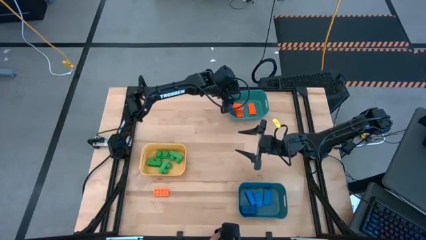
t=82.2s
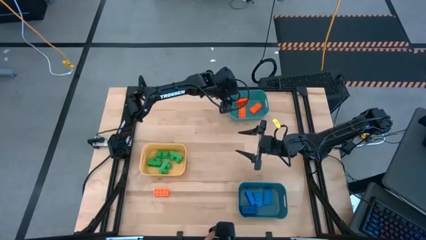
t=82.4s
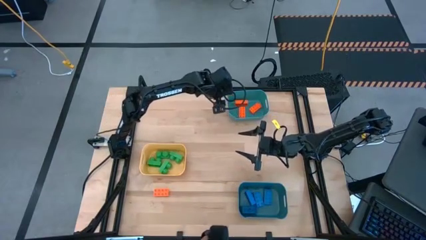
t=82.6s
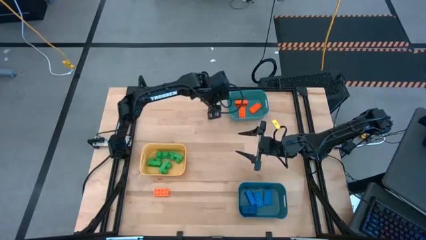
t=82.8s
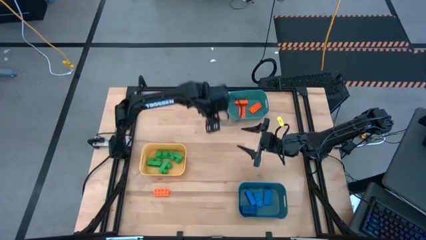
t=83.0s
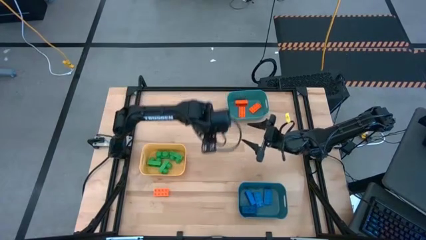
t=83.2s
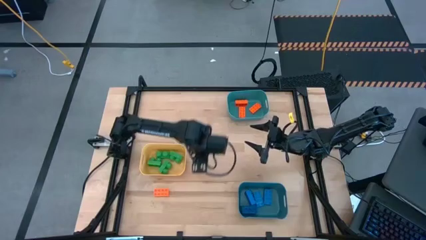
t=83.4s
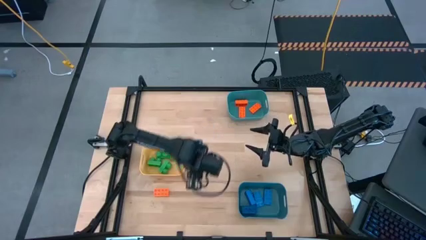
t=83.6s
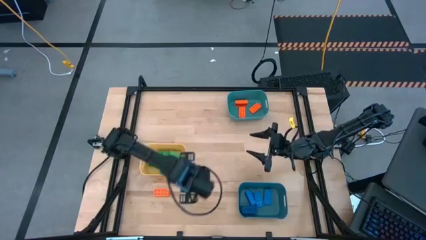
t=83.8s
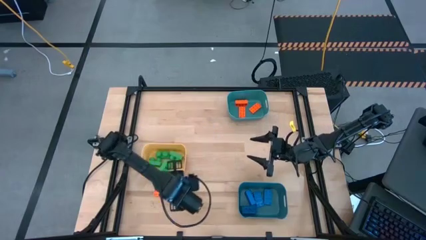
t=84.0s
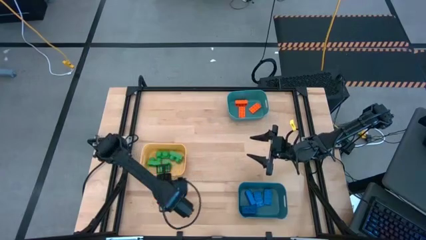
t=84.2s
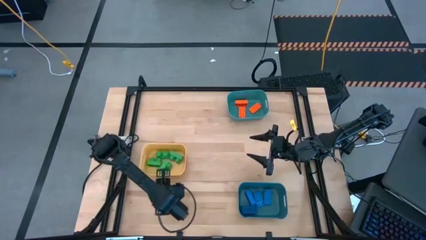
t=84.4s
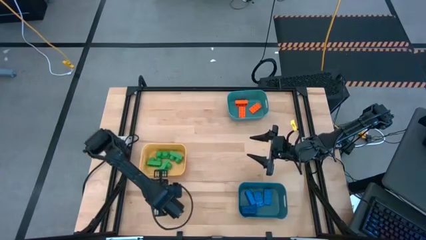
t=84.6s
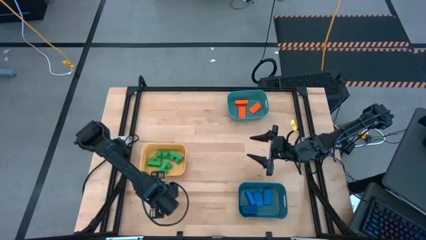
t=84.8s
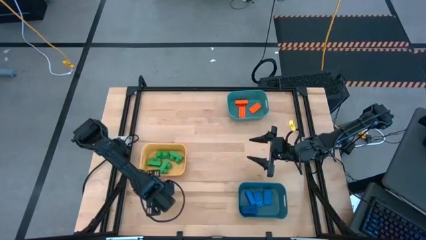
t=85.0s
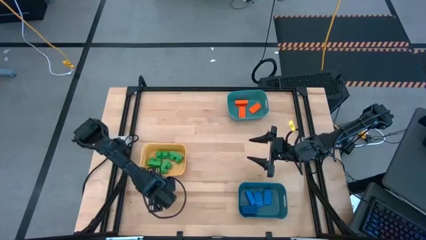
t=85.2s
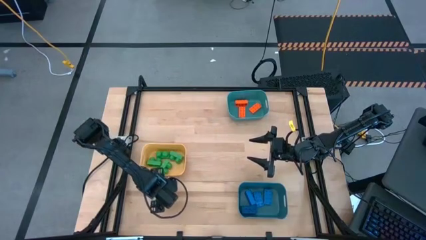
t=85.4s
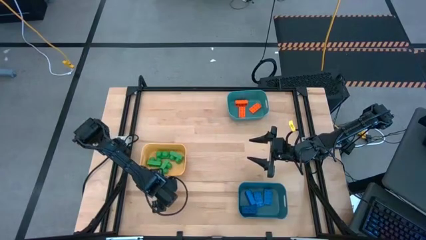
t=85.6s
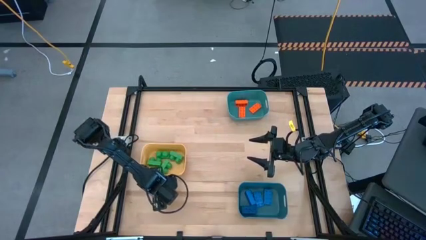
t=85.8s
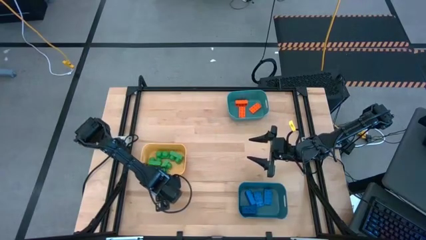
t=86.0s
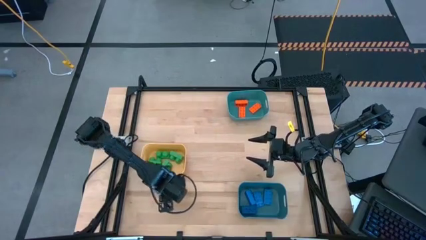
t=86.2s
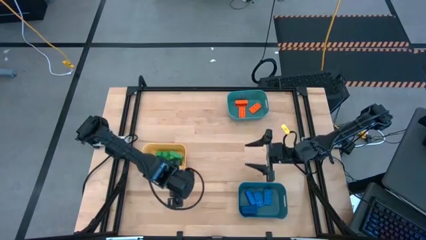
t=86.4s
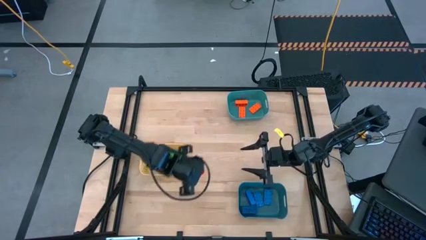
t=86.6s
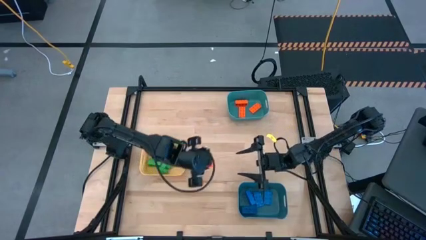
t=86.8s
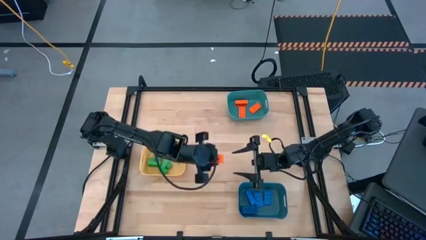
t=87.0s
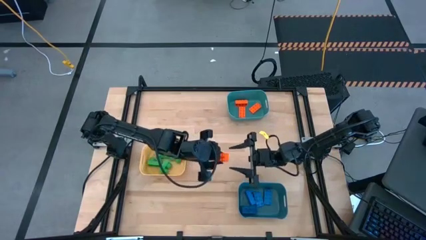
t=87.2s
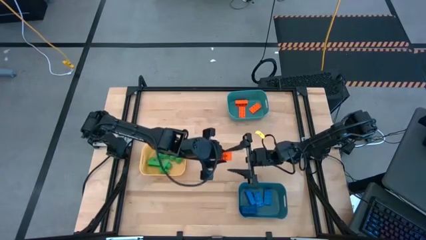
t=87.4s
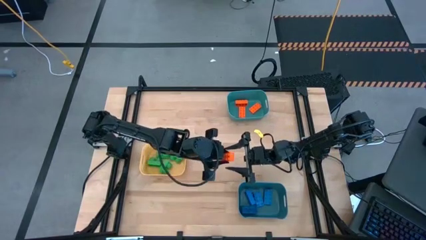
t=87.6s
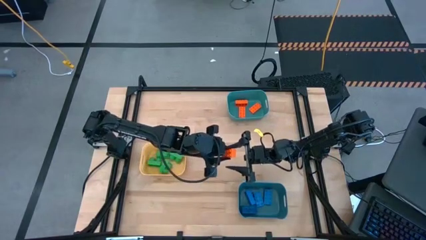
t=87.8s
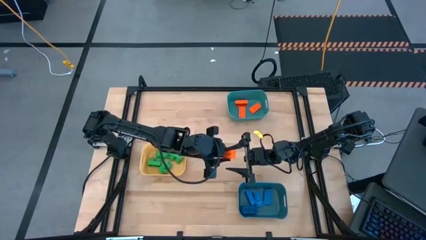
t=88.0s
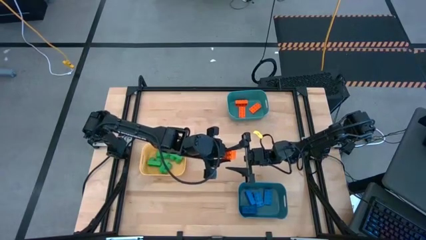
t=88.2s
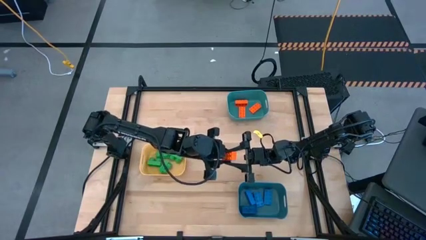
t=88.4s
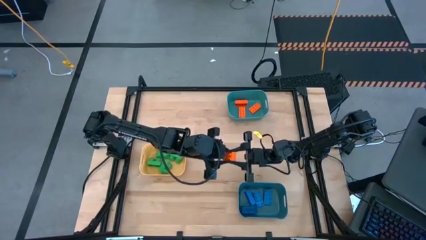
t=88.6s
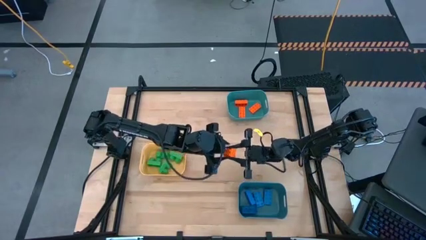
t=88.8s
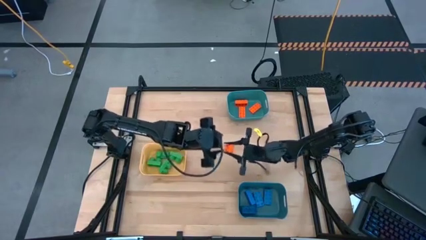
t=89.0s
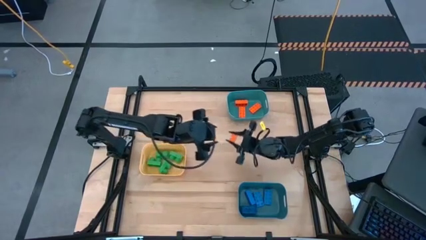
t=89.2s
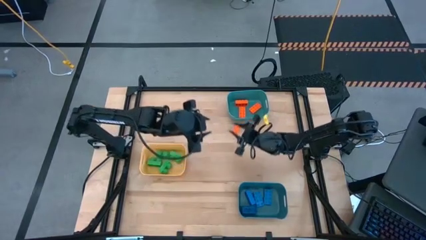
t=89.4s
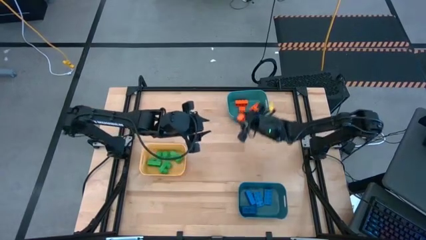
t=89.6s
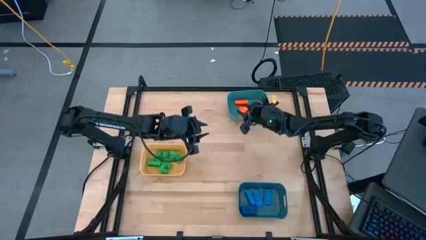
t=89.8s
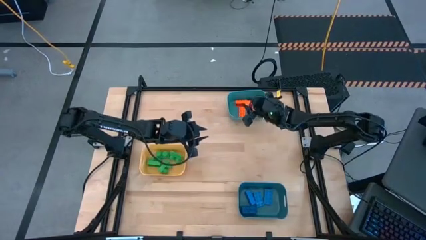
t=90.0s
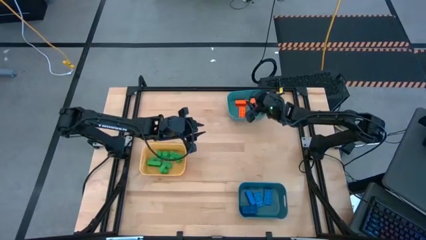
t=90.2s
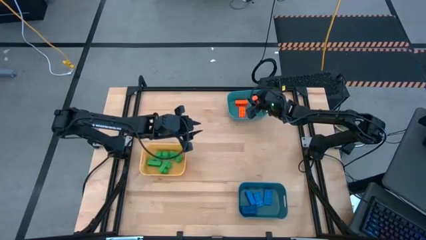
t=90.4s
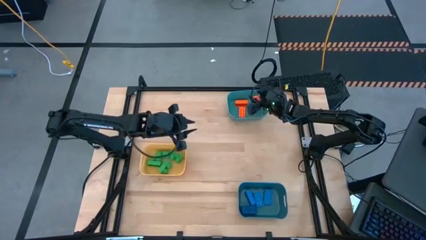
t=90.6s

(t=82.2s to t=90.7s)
Task: Sort & place blocks by color
Put the orange game piece into the green bin

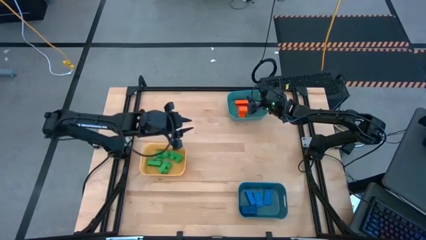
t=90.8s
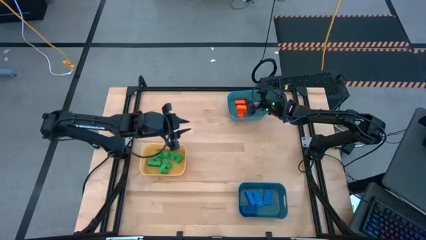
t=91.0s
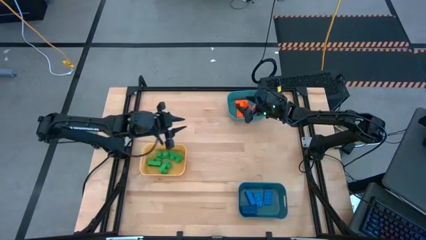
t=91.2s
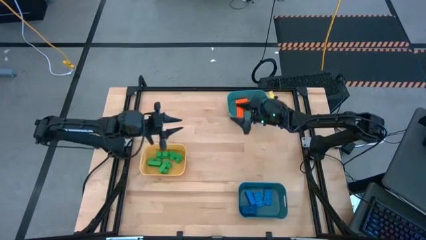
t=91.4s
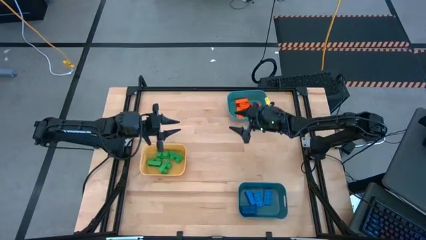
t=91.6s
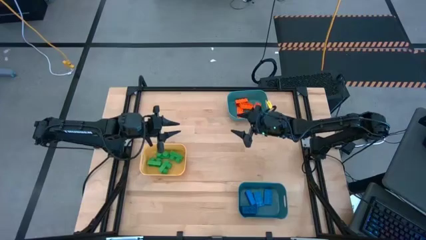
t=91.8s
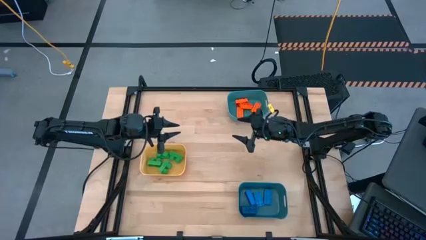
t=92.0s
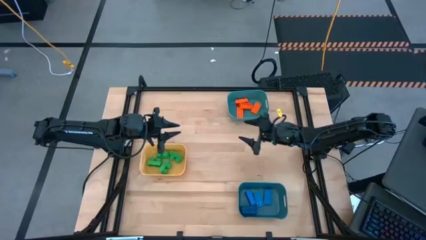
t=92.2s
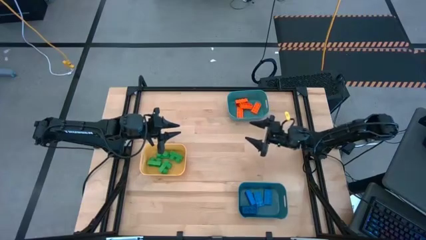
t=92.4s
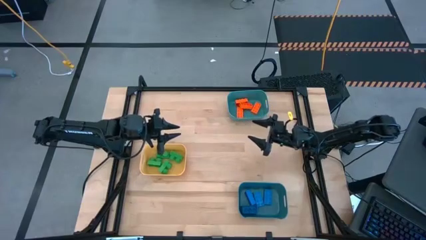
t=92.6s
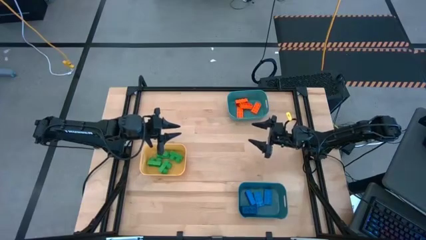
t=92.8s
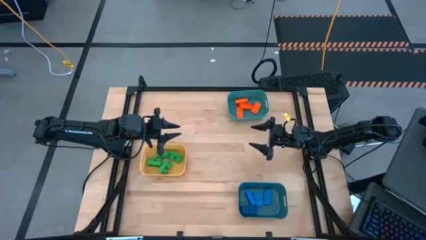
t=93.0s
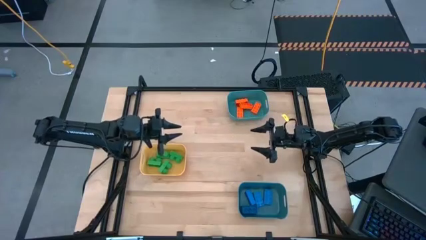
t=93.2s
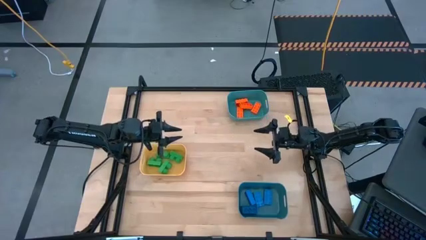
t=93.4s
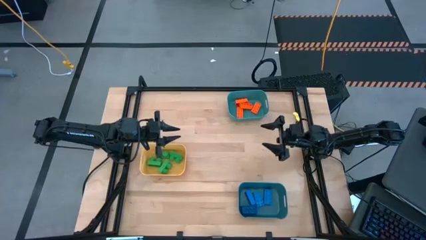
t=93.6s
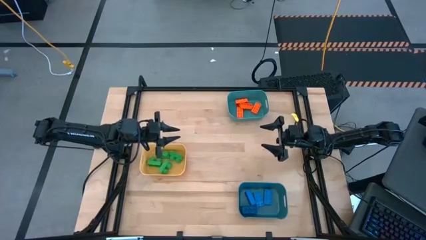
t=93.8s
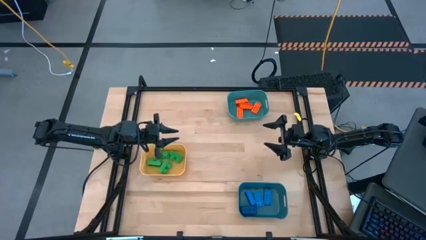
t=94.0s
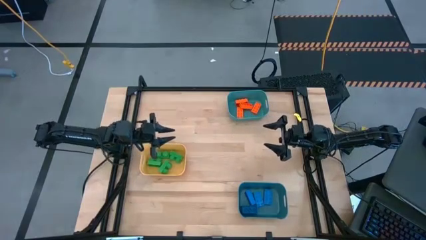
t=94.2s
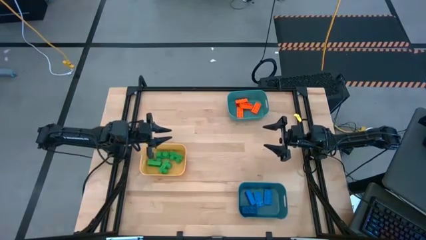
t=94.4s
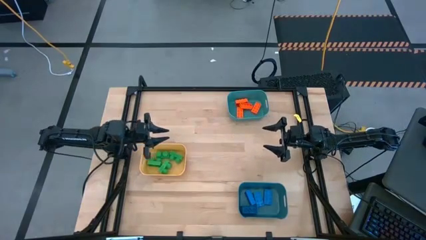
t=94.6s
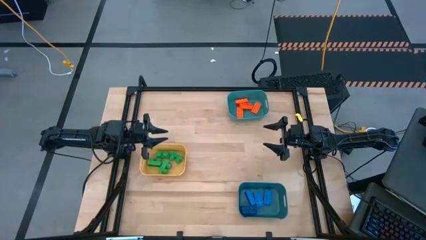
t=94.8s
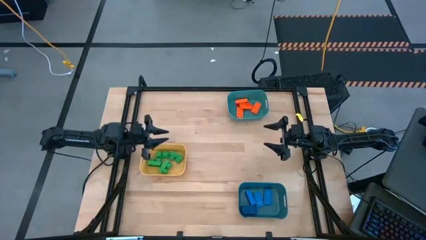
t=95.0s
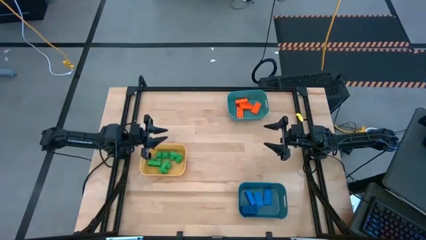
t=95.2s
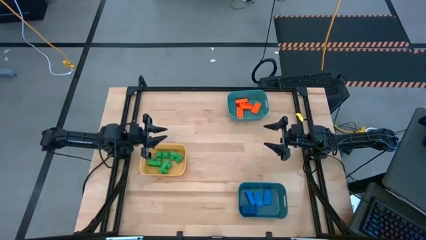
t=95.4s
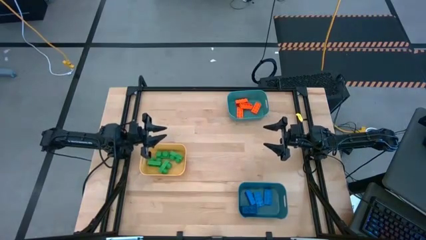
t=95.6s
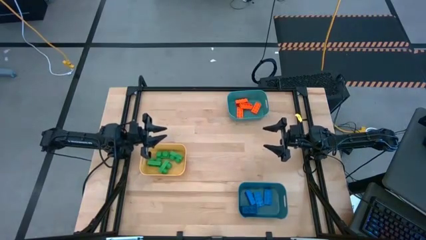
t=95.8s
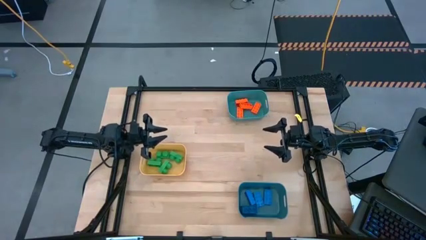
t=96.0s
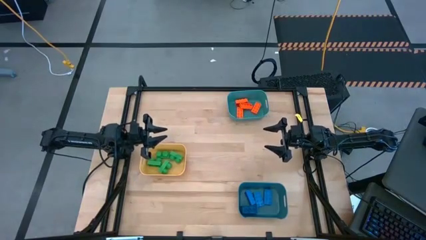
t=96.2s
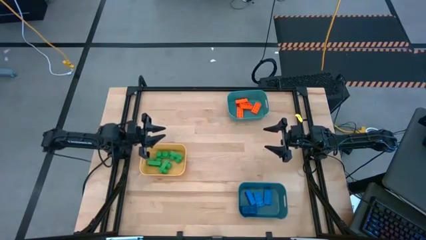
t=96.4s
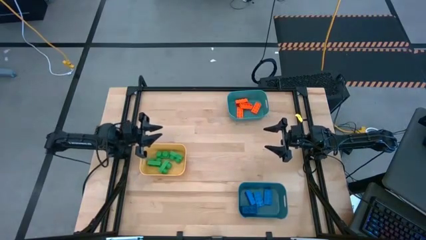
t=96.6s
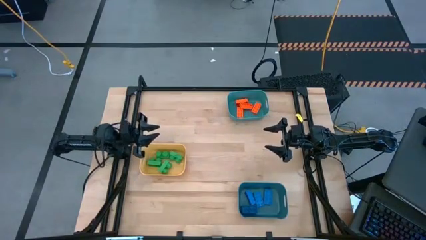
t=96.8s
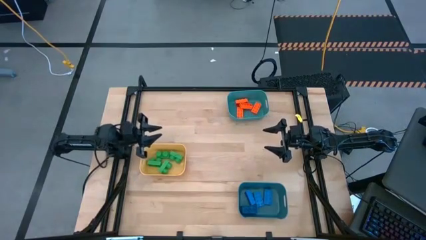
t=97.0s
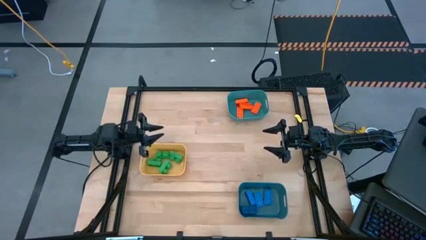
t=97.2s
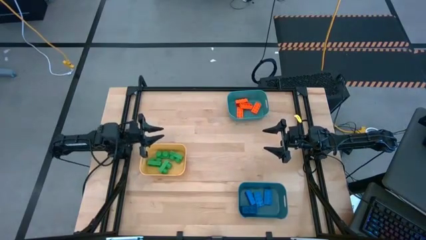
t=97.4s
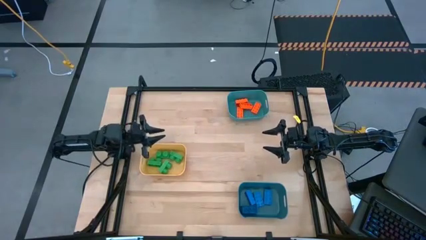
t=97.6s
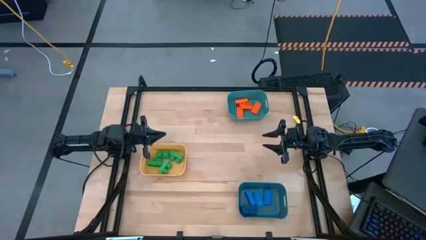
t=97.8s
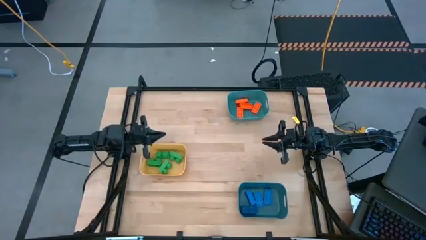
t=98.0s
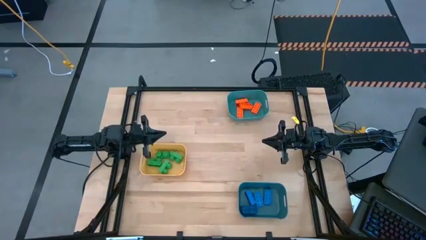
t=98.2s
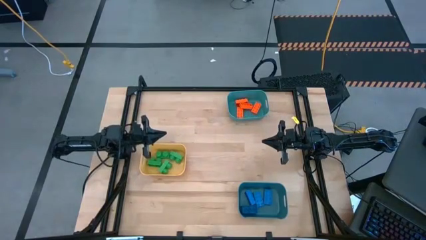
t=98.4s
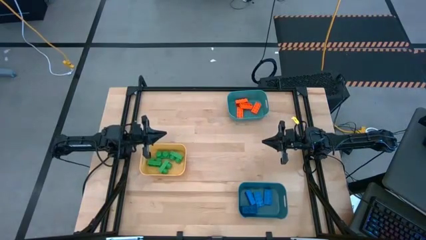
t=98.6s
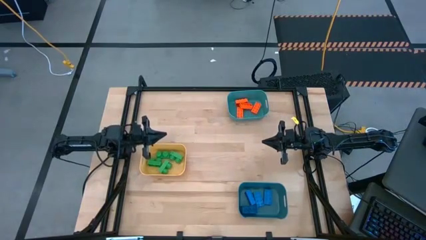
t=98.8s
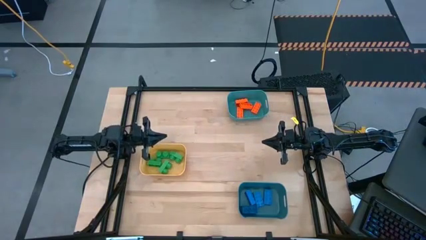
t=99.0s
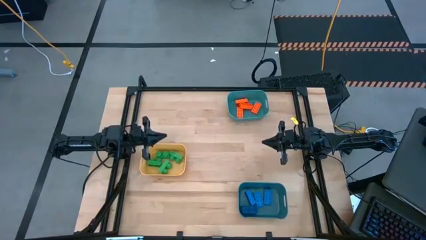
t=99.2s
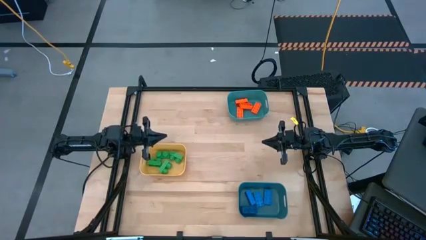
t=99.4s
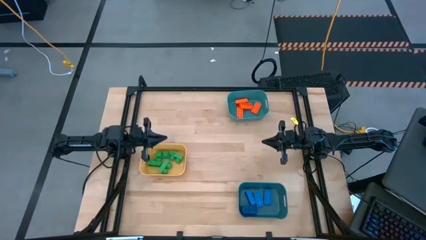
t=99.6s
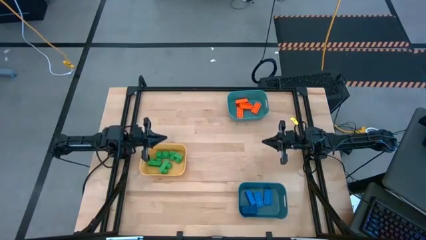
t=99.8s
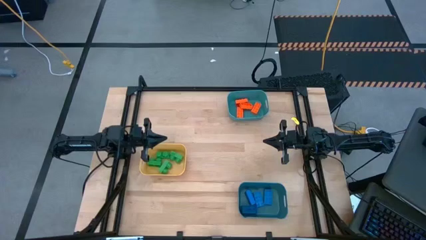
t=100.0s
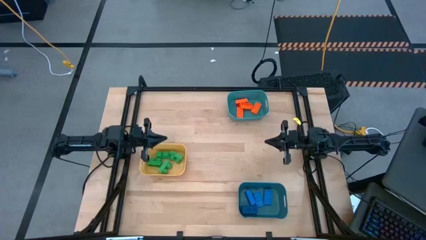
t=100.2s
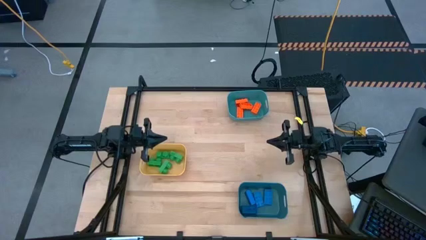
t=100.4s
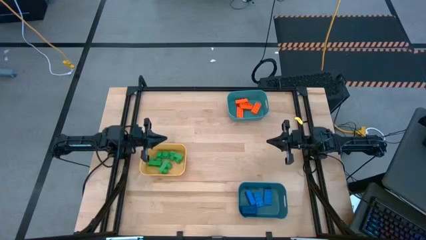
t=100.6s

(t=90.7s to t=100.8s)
Return to Home Position
